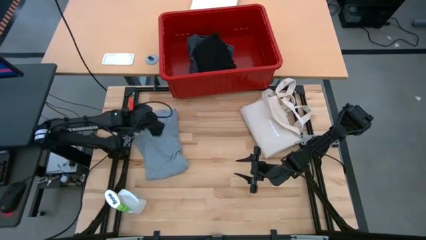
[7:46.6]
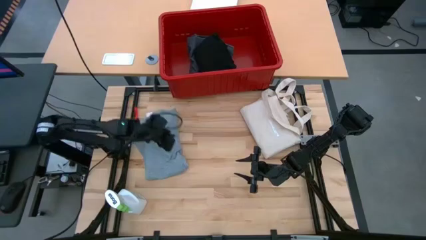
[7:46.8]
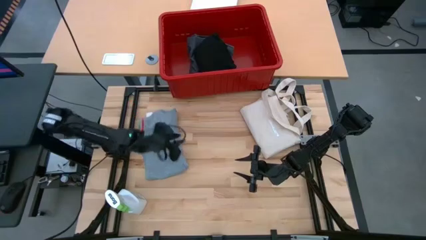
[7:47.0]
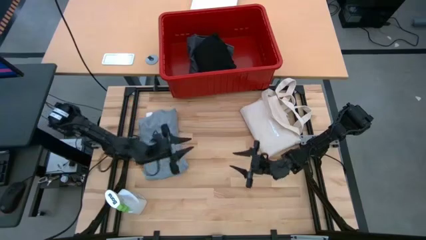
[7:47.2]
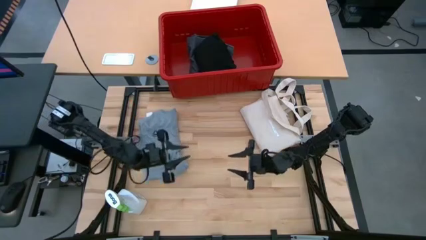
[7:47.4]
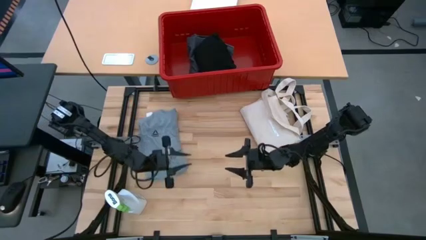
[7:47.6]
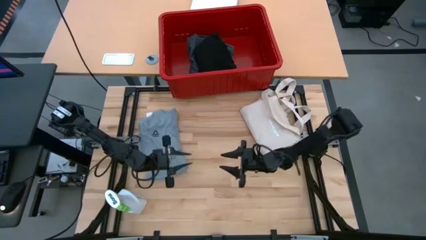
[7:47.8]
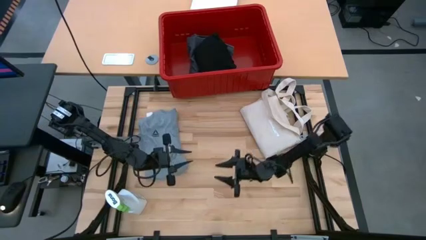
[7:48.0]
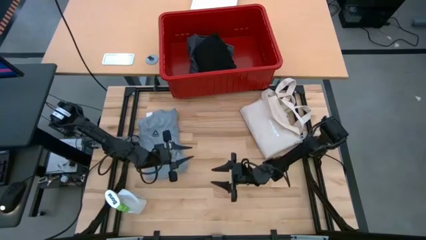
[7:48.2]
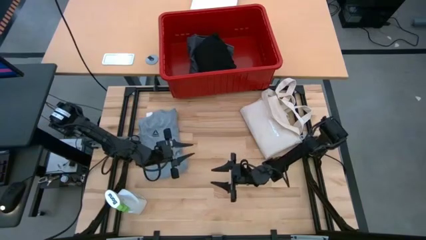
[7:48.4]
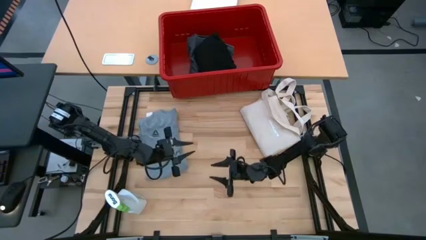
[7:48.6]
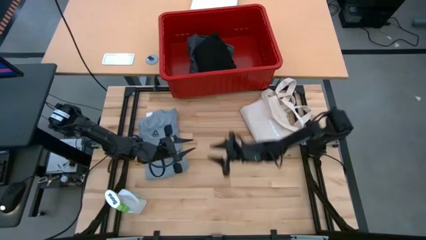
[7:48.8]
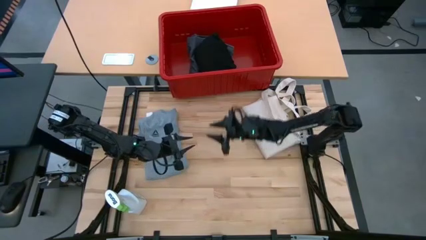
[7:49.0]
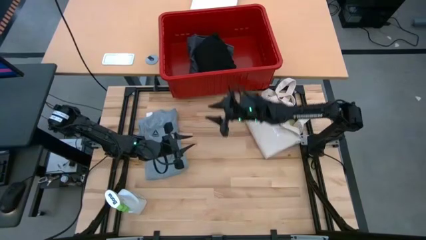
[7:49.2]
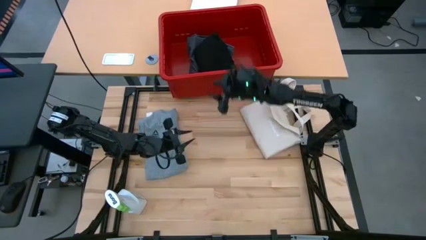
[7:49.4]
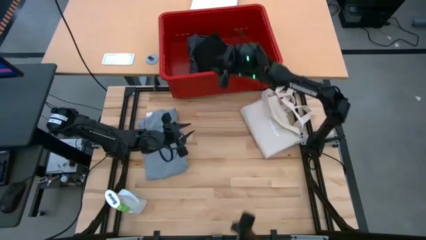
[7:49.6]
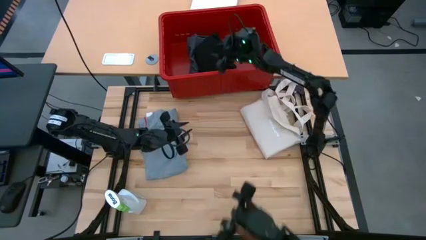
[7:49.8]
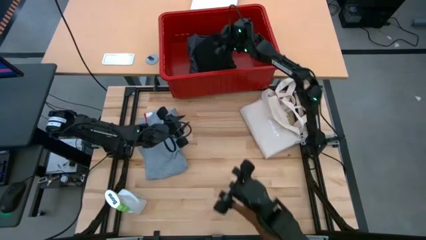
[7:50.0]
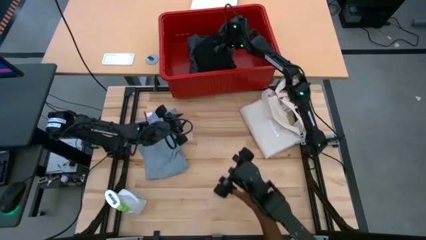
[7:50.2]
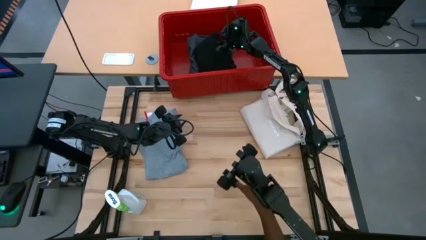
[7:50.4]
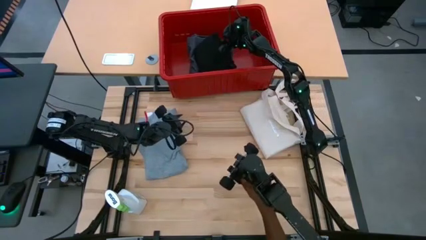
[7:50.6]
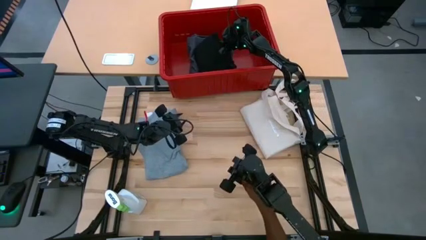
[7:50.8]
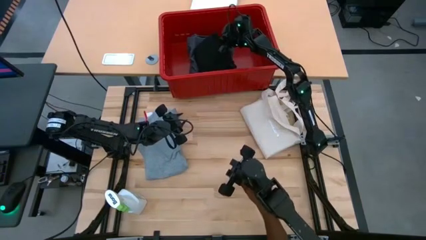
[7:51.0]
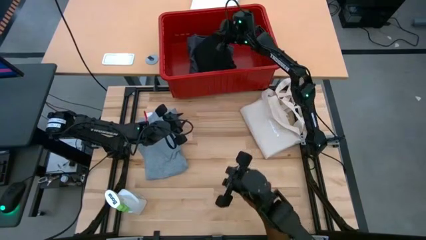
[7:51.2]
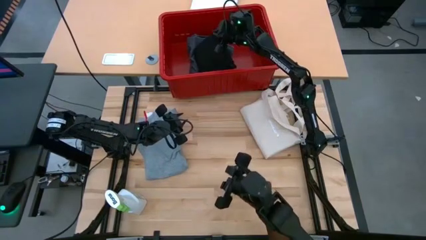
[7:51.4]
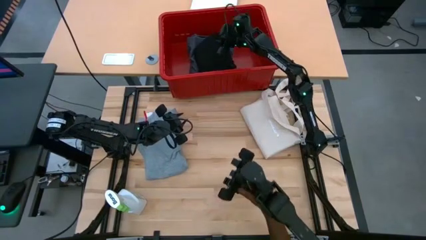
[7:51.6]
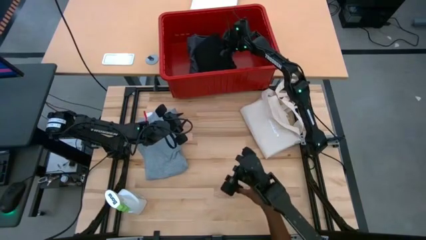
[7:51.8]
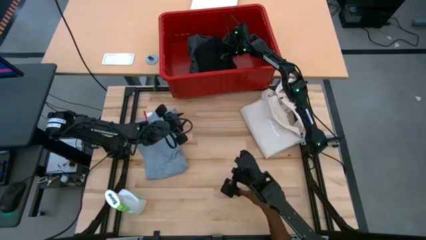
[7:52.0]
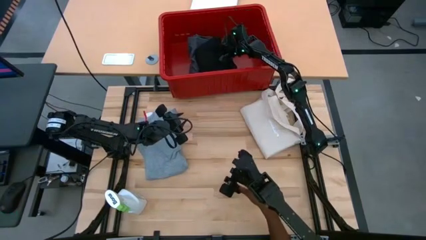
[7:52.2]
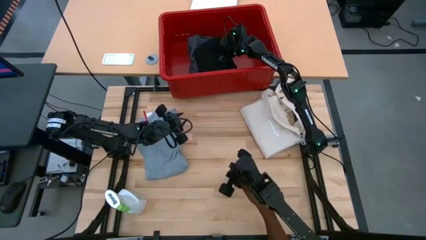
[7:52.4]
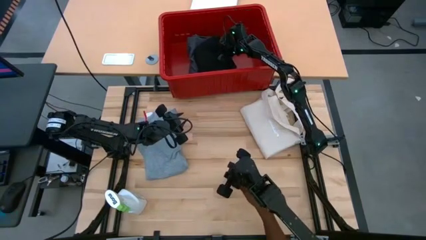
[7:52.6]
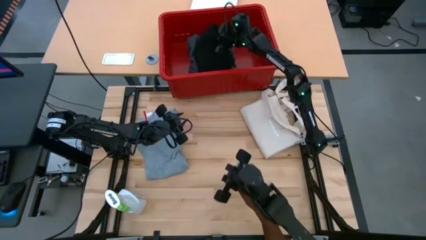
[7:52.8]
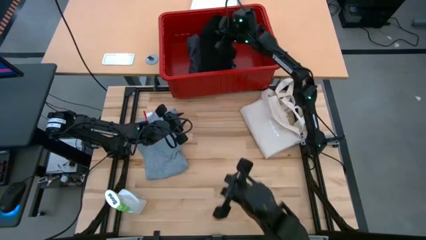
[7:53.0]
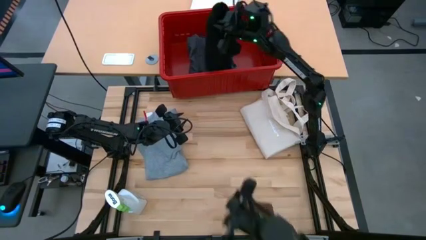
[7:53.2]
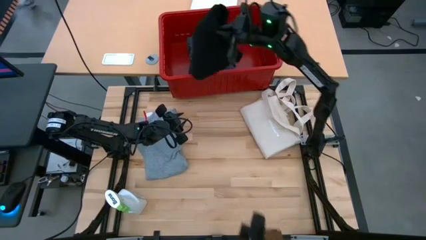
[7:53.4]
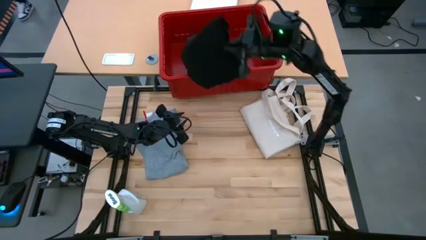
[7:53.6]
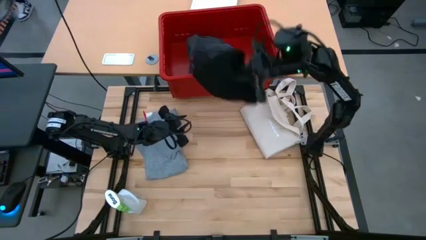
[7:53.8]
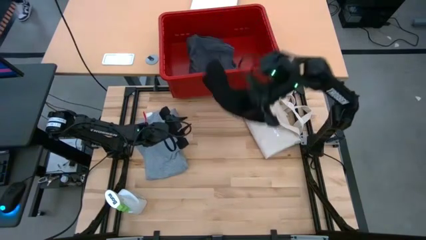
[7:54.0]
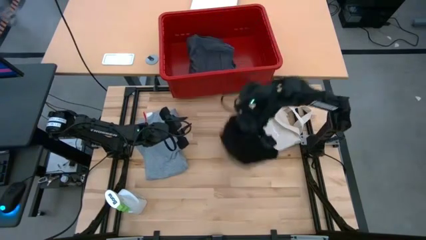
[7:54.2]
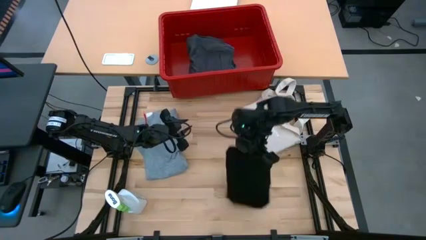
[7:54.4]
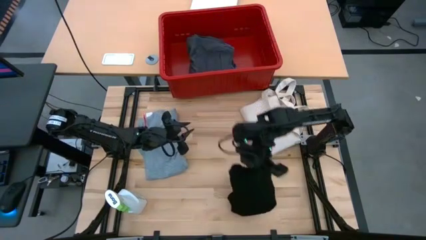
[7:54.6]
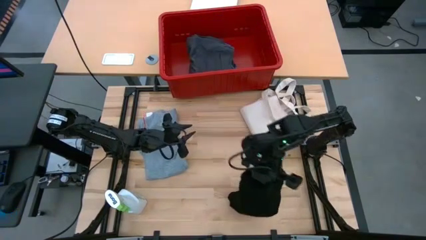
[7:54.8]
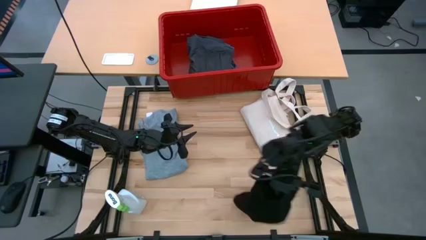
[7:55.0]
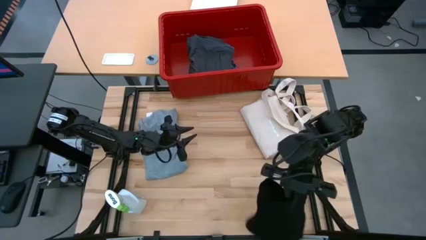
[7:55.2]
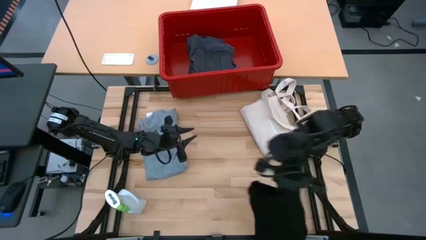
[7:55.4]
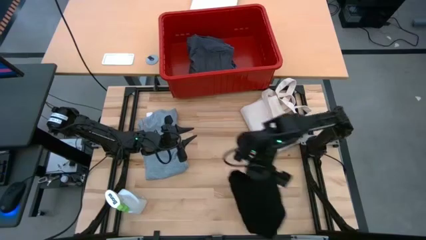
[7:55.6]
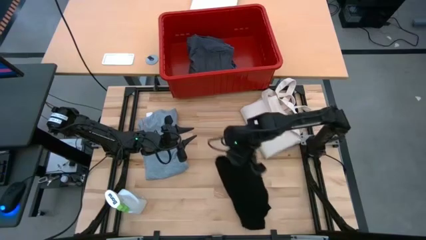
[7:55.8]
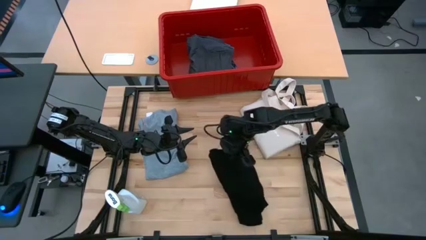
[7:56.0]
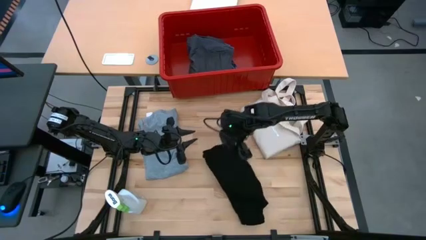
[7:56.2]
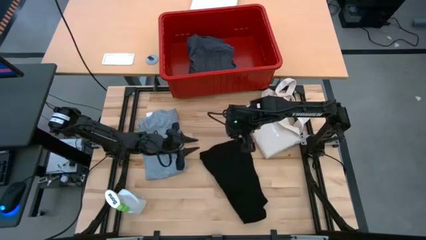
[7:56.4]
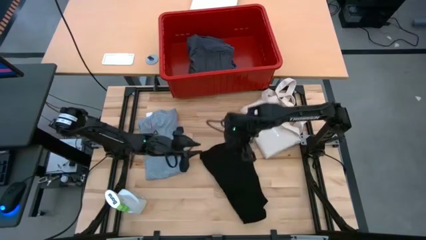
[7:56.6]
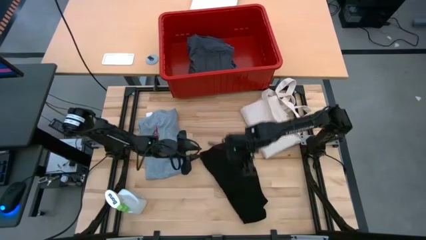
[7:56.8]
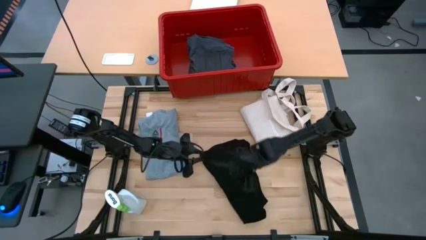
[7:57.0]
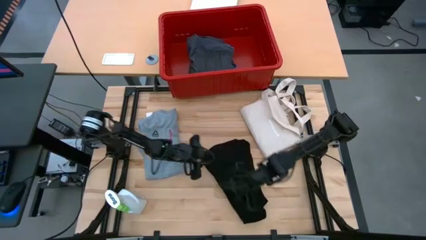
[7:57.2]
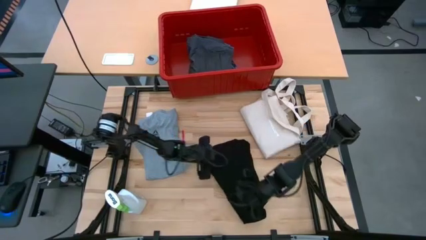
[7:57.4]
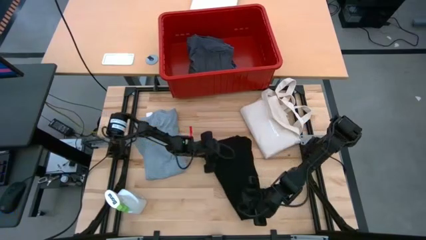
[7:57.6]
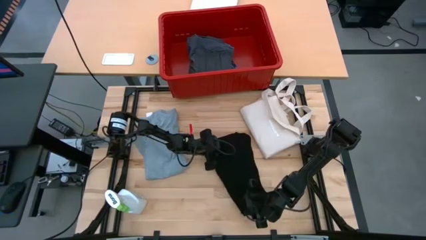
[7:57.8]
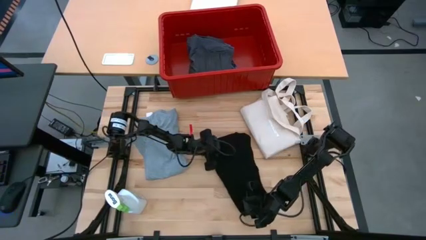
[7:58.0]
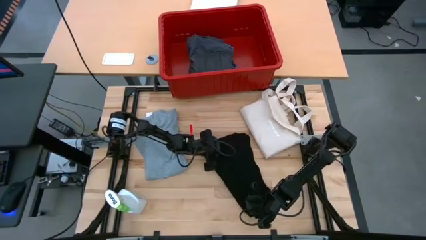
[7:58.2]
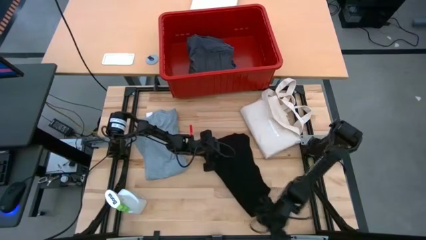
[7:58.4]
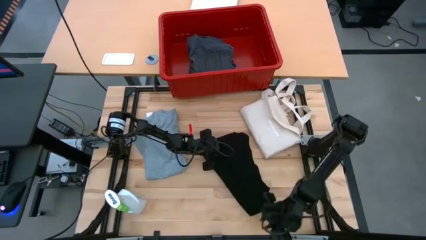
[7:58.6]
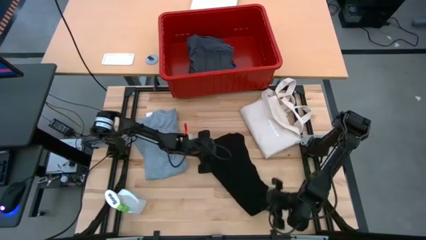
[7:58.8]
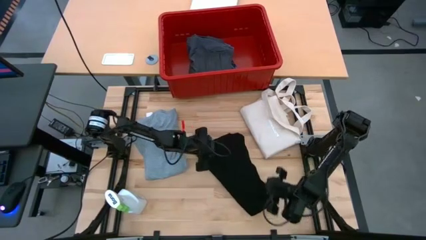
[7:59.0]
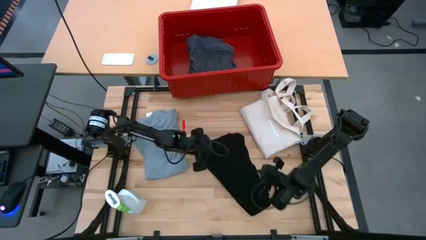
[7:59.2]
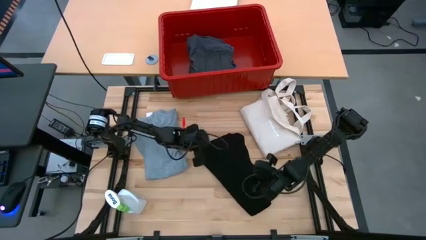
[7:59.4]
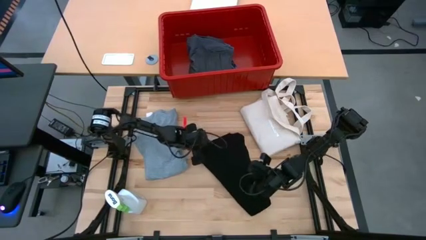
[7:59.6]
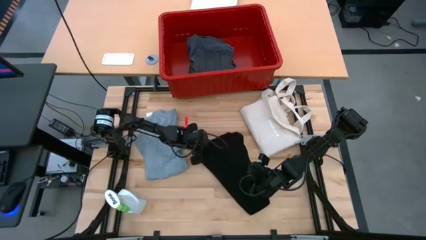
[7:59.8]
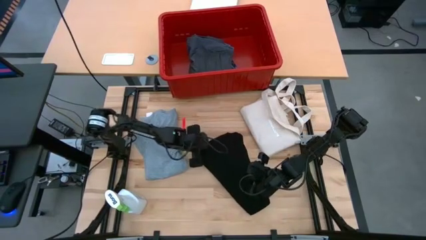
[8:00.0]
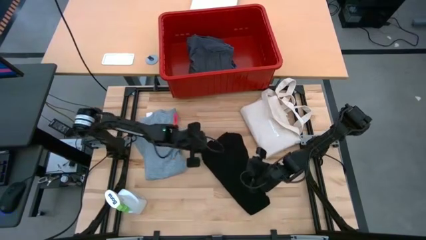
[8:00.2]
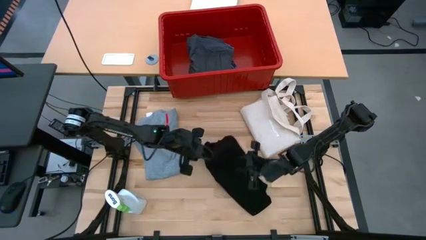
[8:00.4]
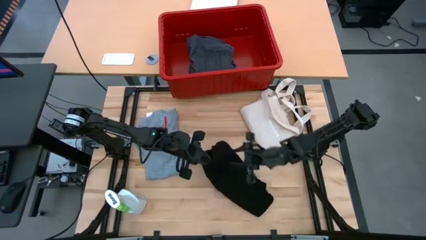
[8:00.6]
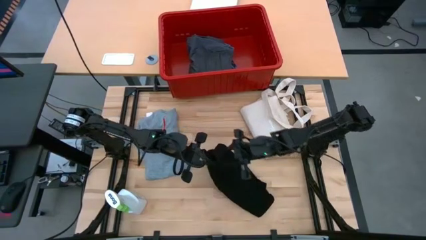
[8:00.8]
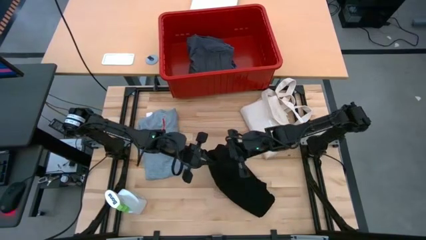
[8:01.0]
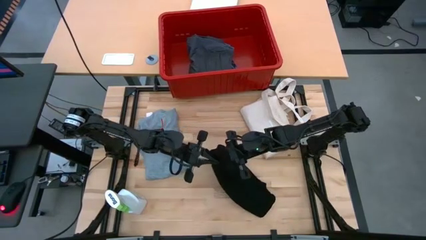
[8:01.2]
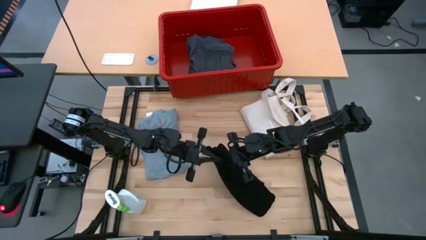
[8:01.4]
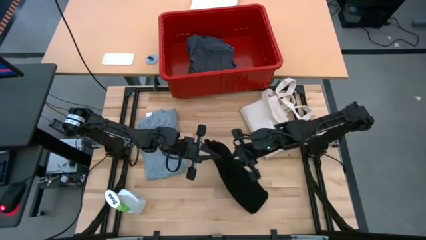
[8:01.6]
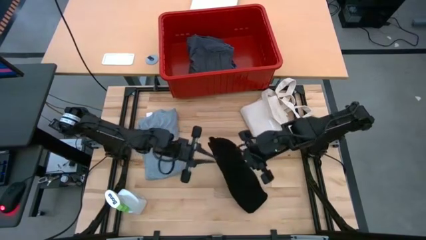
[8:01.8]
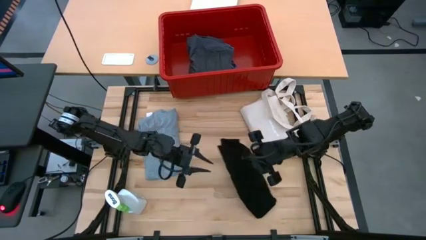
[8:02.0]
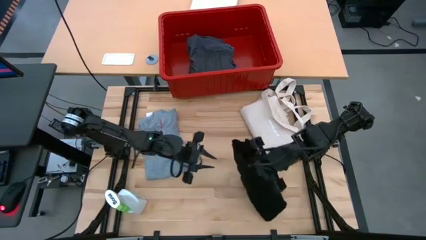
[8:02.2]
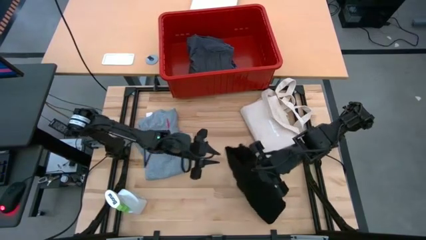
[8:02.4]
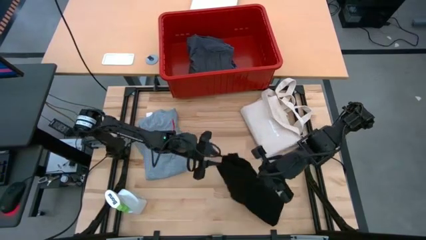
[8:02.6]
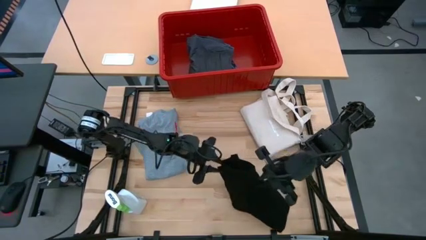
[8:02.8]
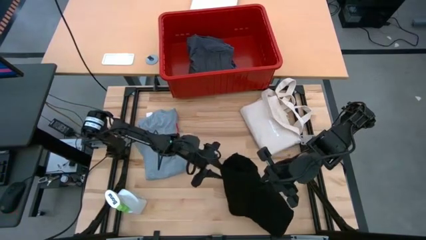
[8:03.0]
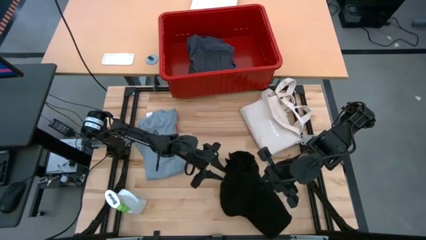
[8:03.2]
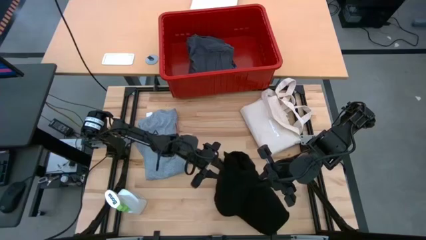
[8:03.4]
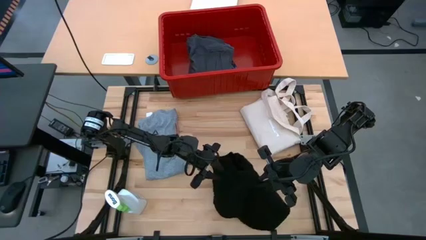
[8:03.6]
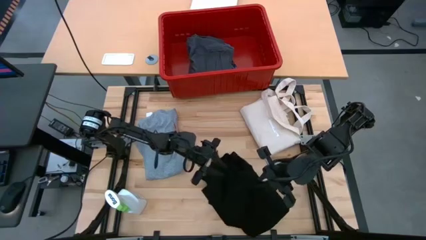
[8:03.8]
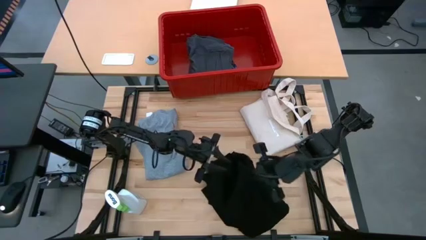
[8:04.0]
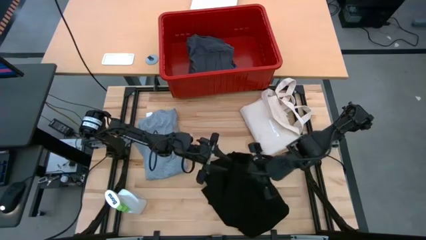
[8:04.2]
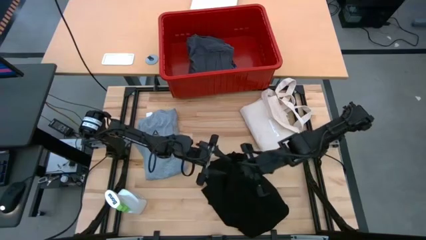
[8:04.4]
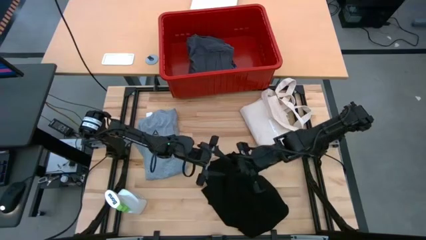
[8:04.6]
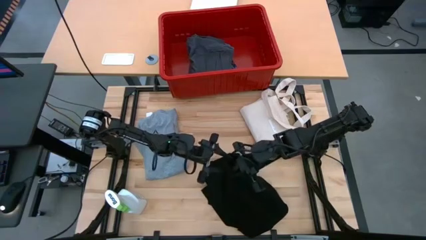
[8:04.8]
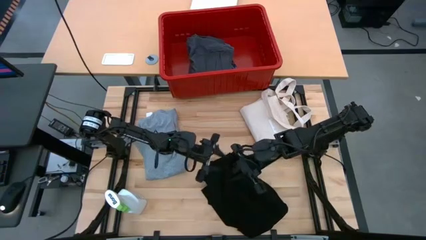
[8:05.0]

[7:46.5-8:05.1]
Task: Fold Laundry from Bin
Fold the black shirt
